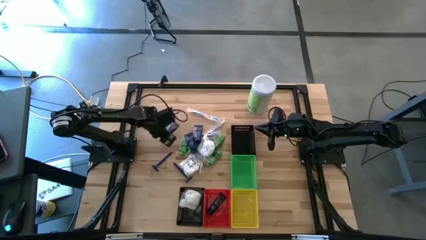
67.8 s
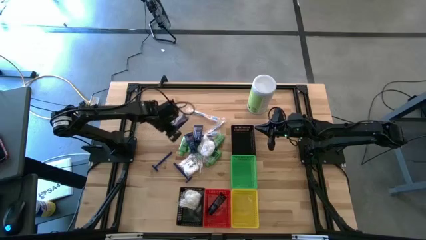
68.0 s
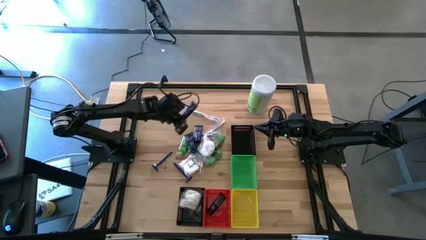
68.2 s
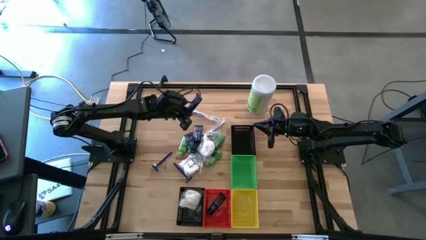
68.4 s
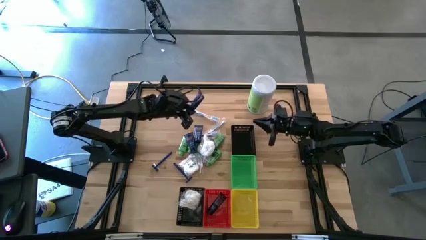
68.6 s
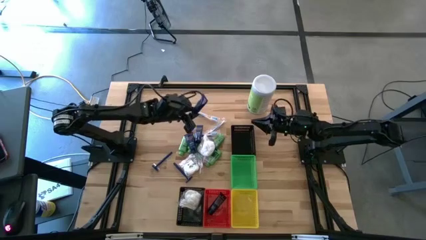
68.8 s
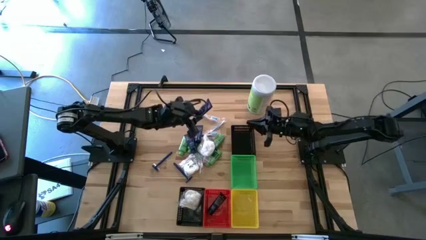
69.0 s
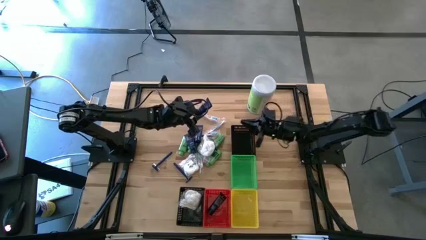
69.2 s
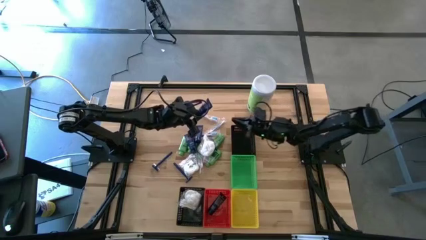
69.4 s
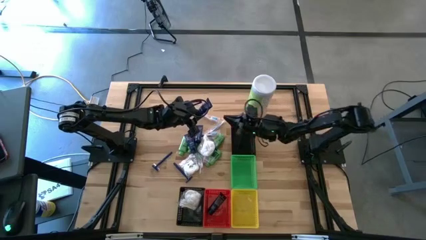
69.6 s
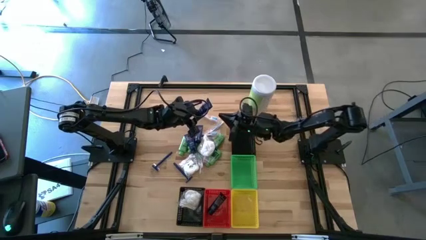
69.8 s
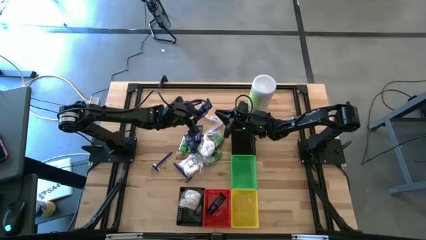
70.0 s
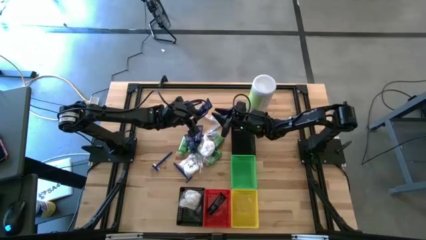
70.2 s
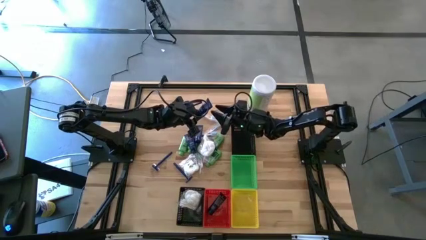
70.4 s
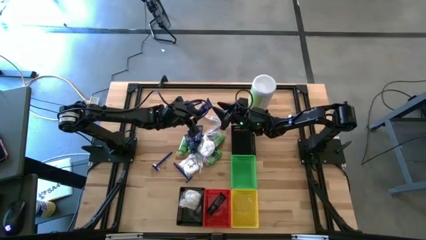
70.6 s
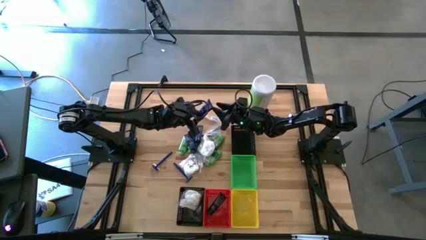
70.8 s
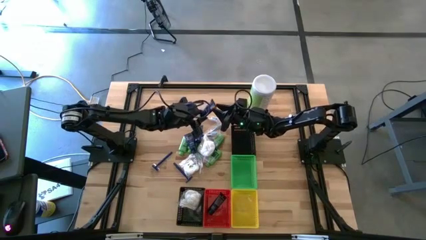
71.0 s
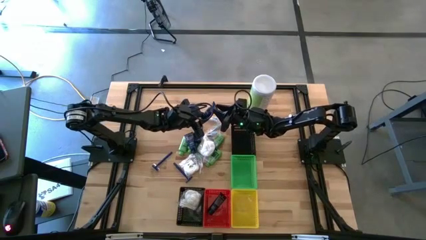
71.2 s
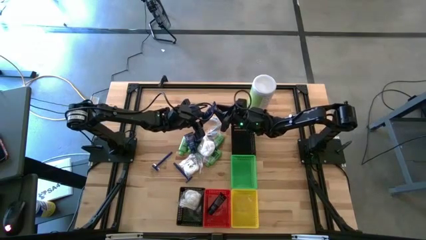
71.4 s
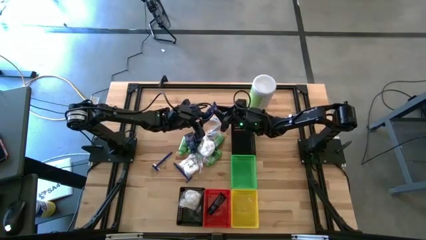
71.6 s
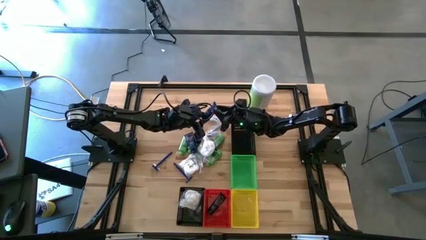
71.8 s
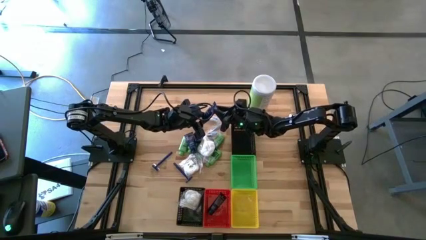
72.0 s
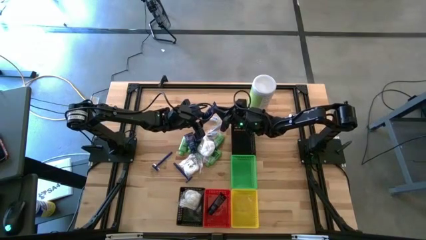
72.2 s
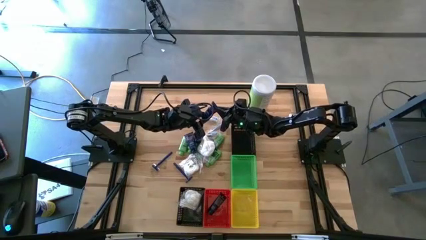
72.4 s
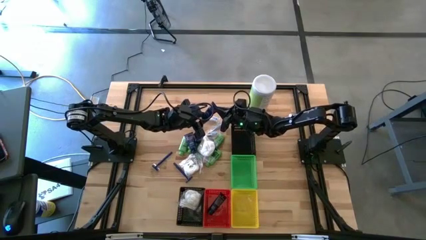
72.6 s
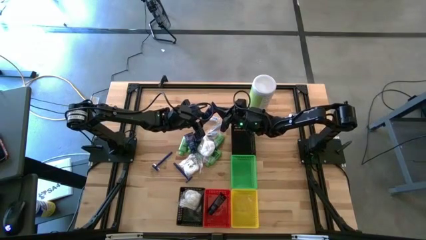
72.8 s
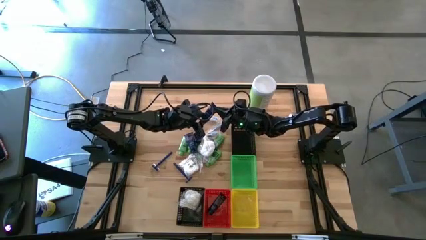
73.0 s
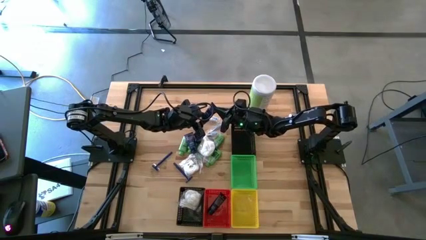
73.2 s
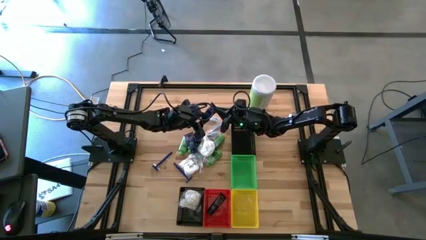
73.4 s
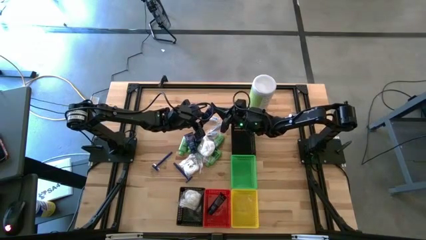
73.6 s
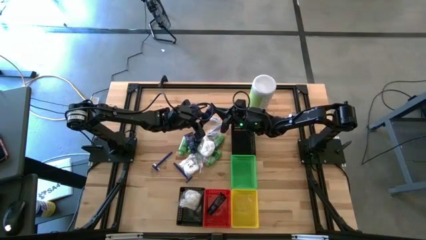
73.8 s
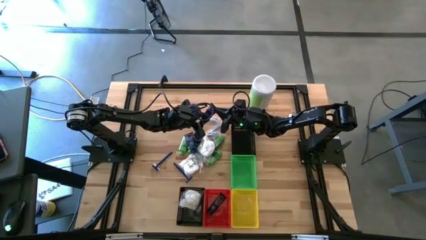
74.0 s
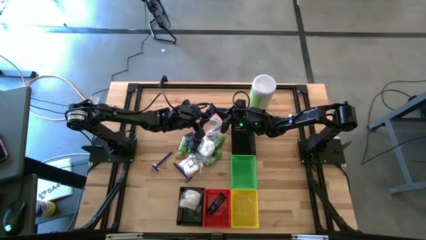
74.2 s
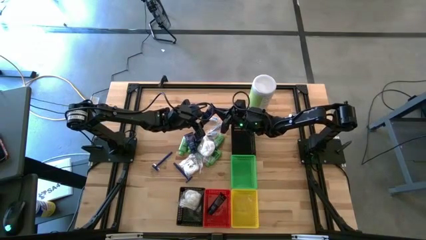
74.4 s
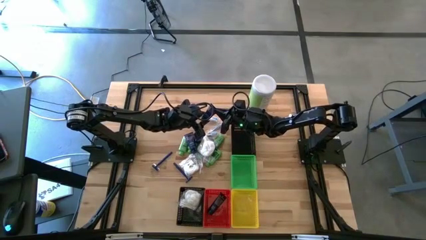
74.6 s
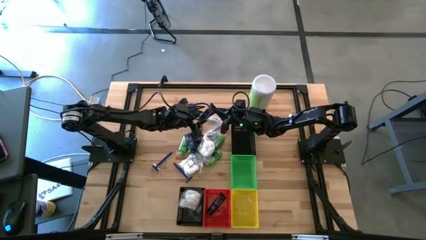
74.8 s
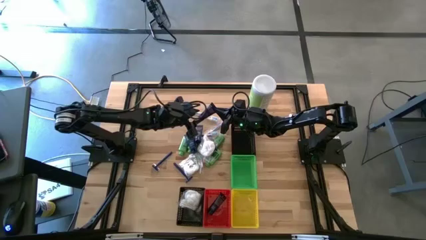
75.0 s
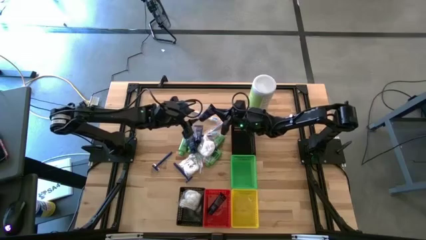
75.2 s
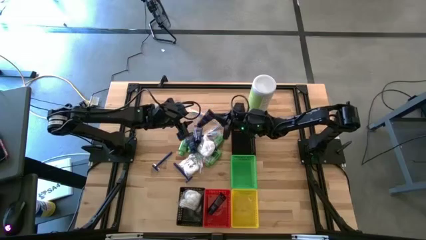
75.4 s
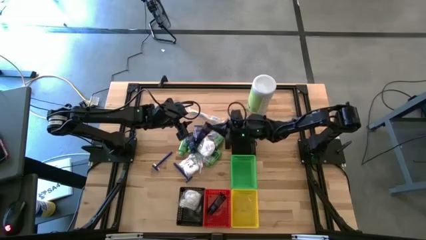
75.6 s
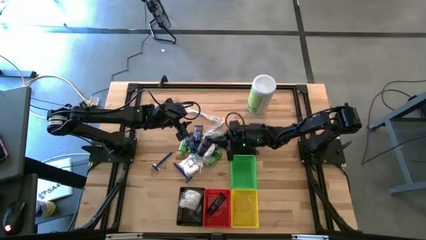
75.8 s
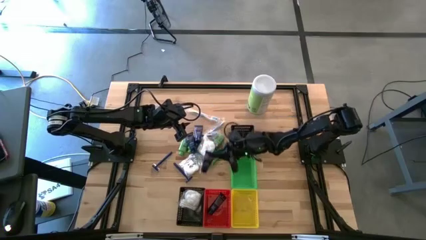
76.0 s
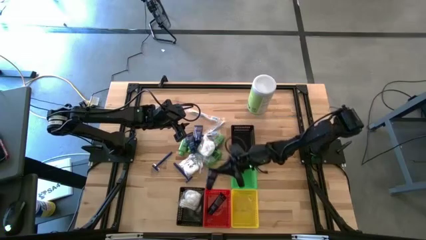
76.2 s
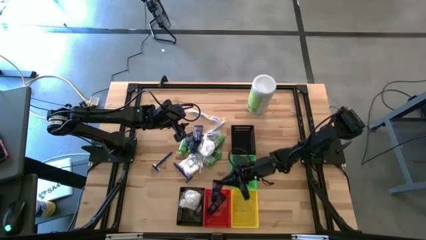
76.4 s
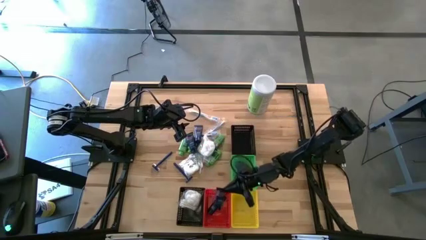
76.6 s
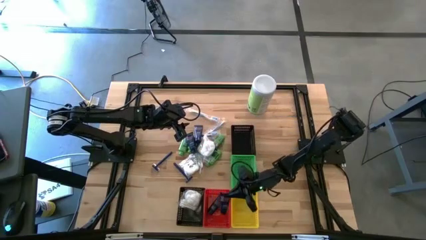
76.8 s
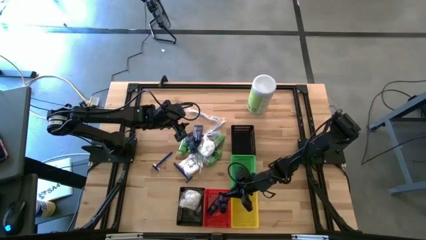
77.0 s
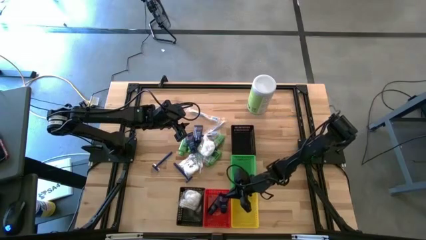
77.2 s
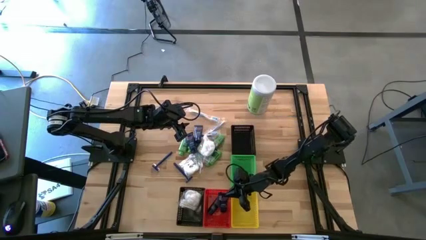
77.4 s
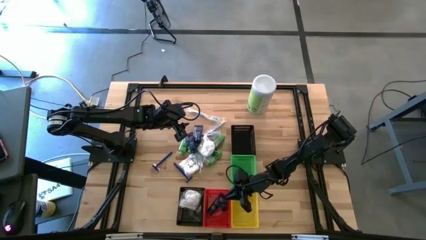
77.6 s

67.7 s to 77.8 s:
Task: Pick & Place Travel size toiletries
Put the blue shave cream into the red bin

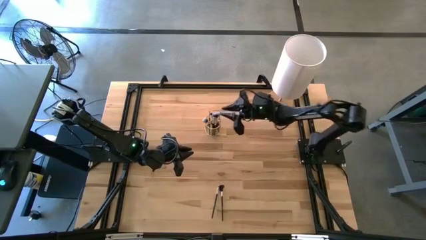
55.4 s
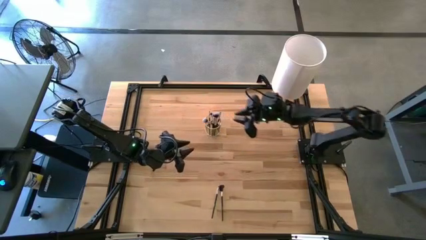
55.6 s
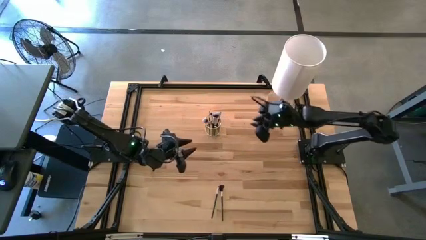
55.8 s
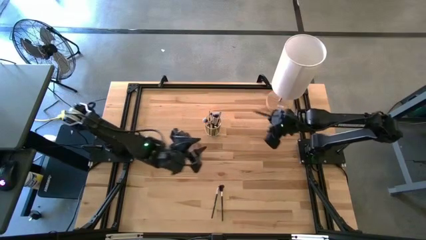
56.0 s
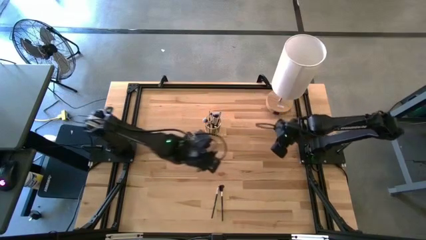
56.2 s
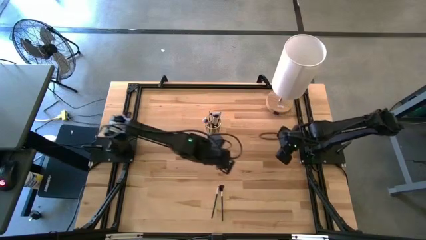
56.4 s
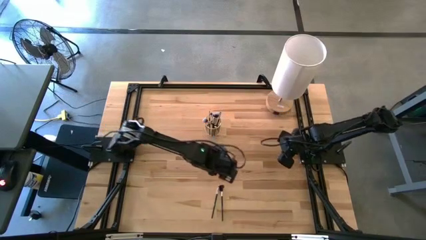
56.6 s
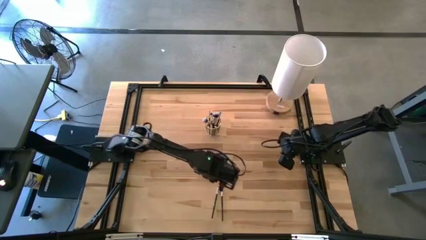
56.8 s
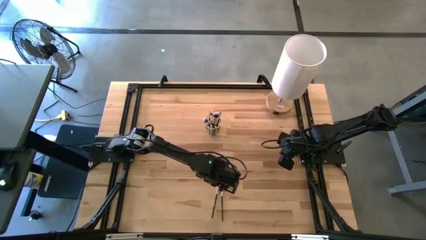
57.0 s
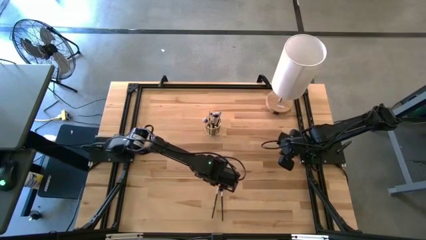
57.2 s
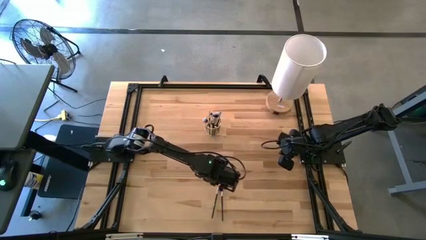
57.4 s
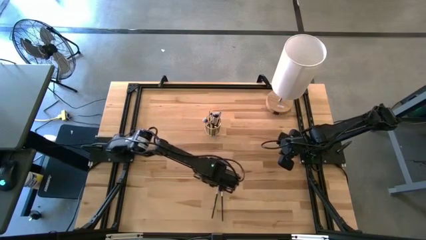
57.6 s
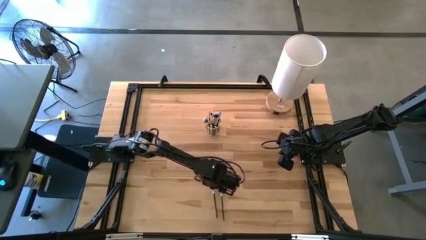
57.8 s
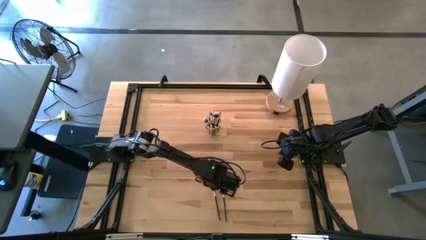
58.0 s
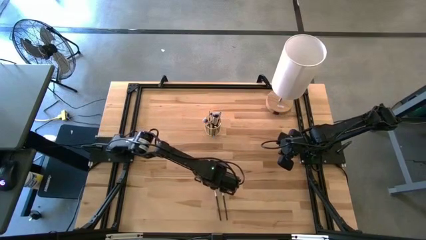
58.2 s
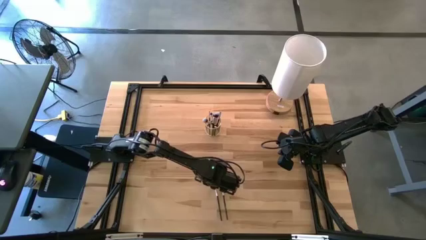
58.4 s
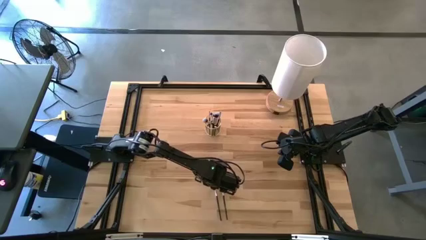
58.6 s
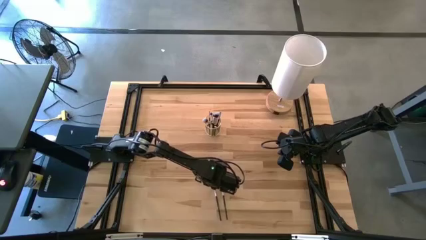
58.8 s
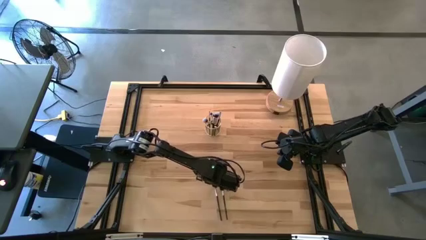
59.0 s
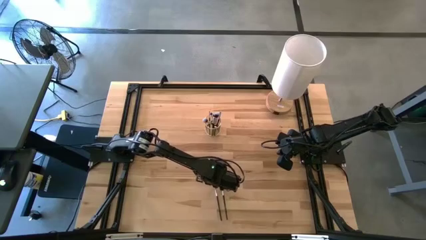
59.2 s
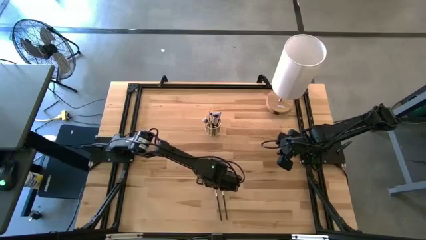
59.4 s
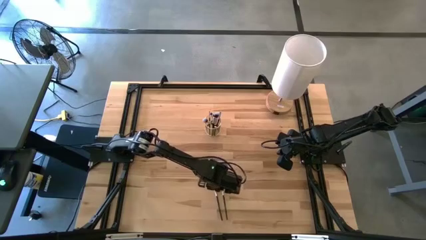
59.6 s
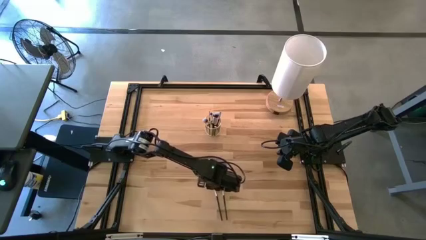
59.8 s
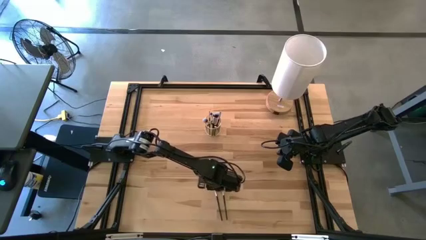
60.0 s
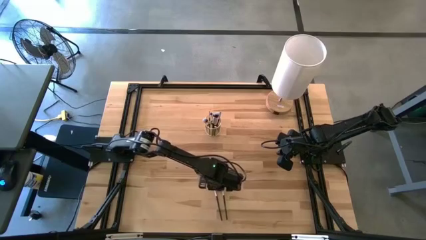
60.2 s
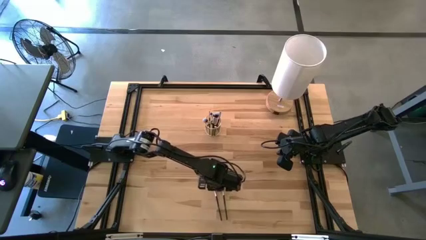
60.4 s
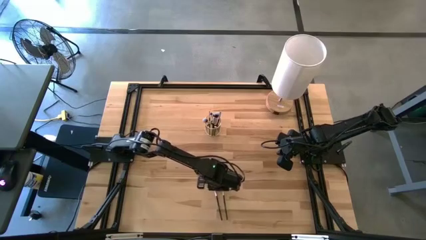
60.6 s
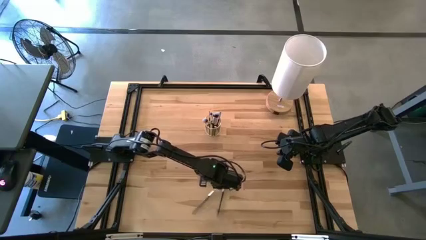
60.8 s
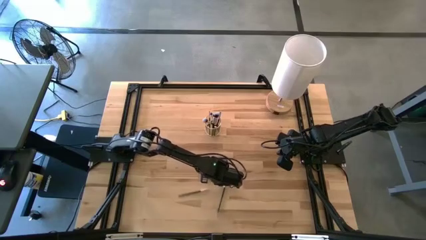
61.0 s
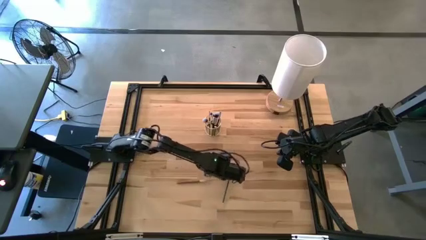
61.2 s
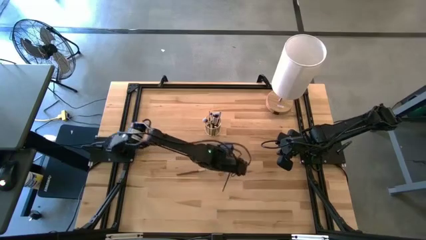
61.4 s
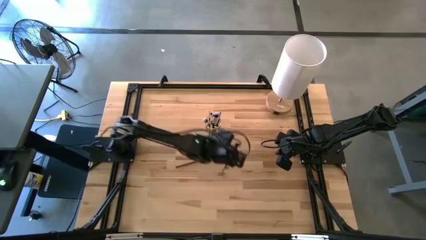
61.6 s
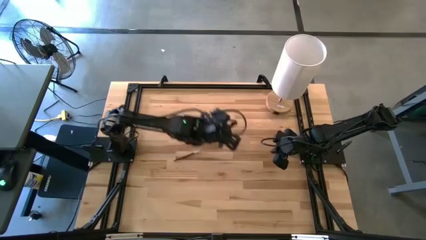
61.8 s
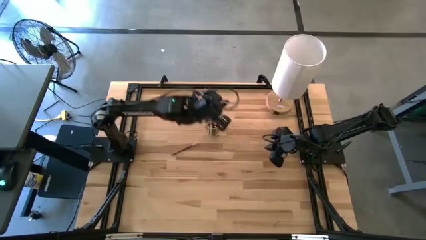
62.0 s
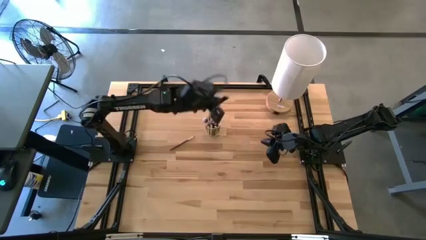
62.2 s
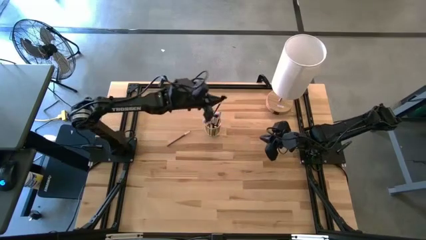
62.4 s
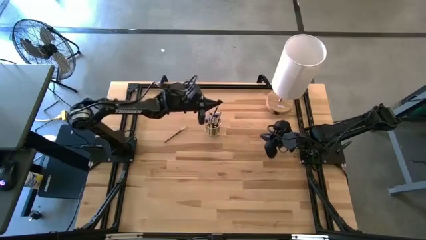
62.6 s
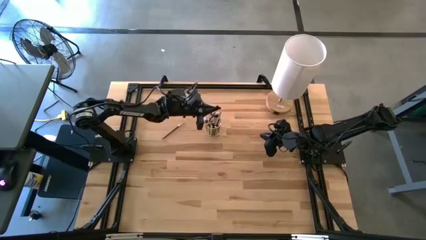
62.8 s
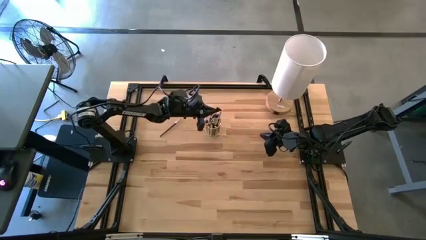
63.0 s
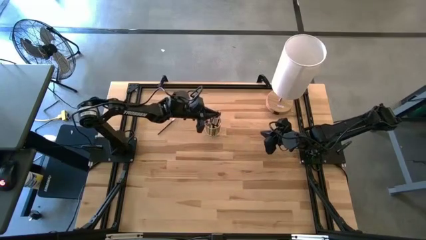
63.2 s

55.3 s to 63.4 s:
Task: Put items in baskets/containers
Put the black brow brush into the gold container
